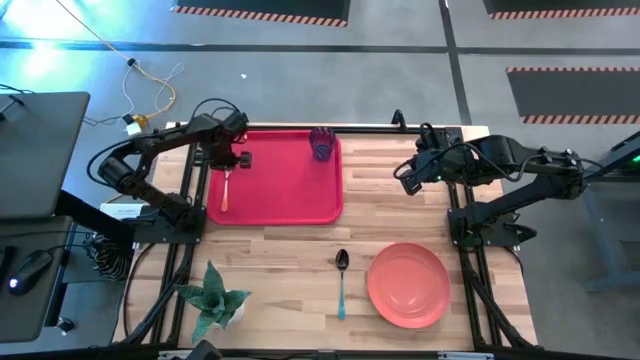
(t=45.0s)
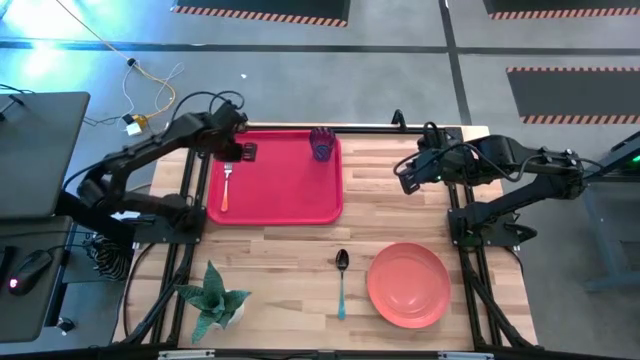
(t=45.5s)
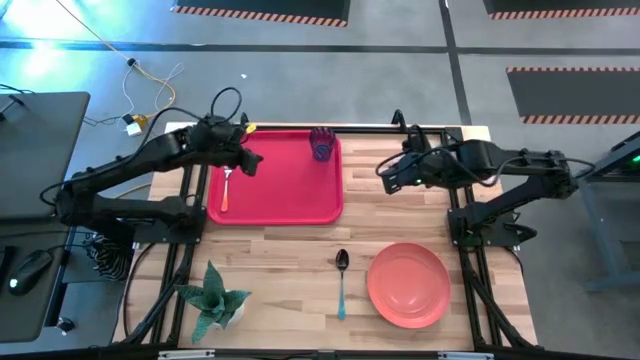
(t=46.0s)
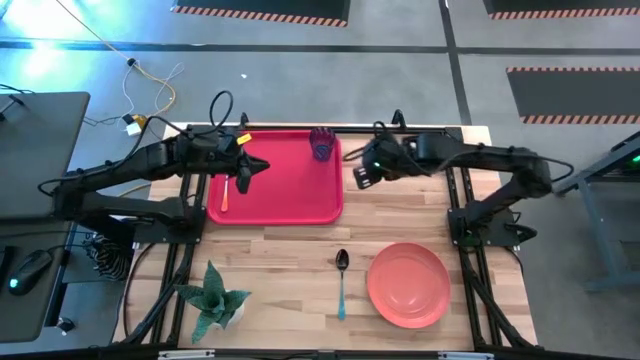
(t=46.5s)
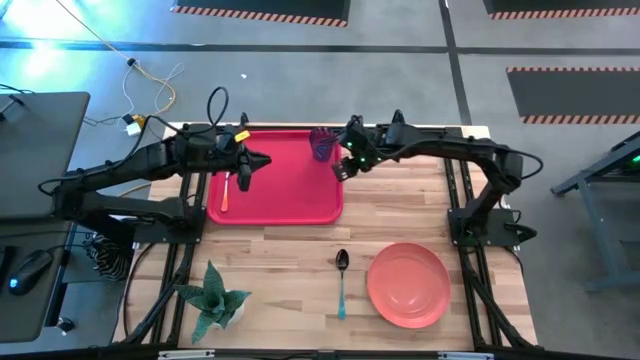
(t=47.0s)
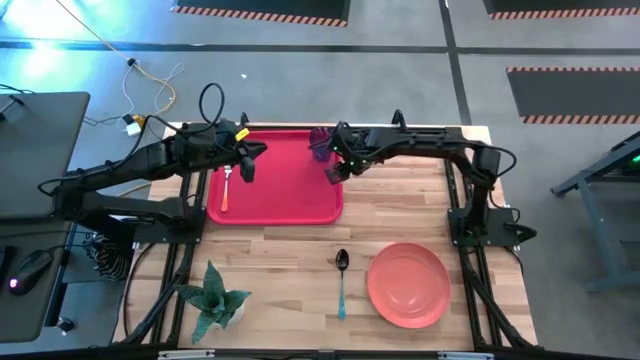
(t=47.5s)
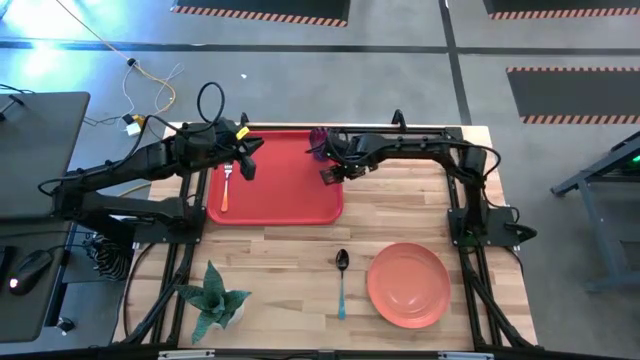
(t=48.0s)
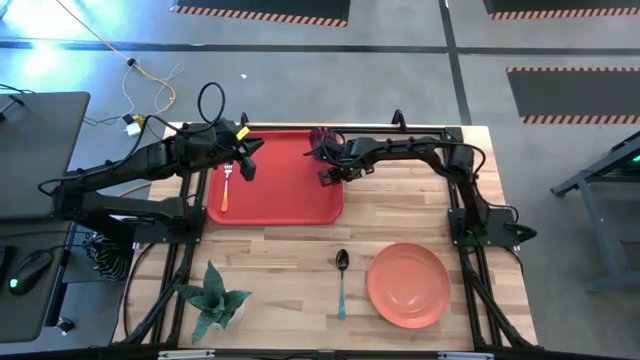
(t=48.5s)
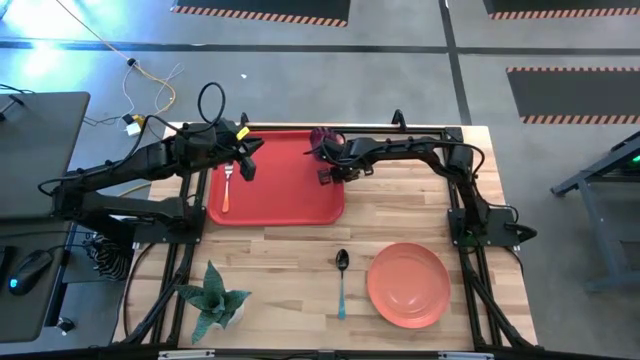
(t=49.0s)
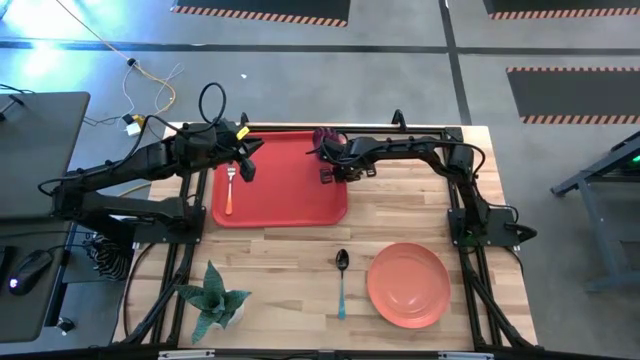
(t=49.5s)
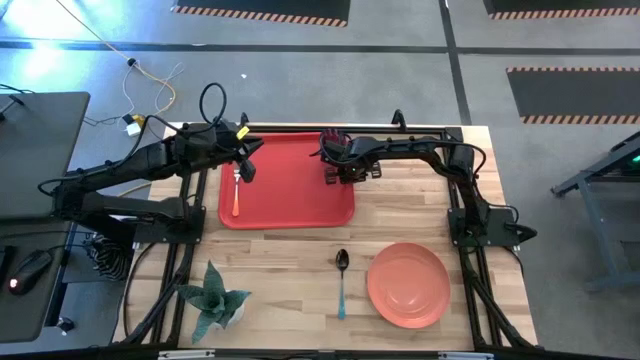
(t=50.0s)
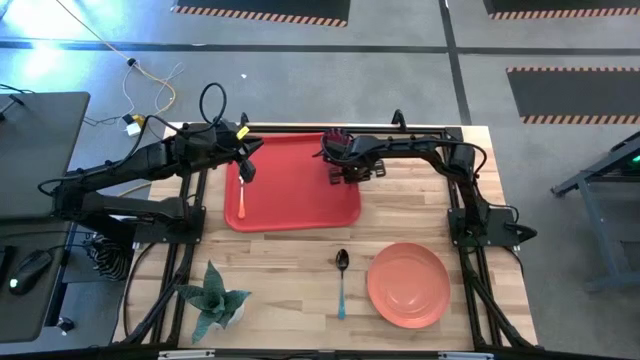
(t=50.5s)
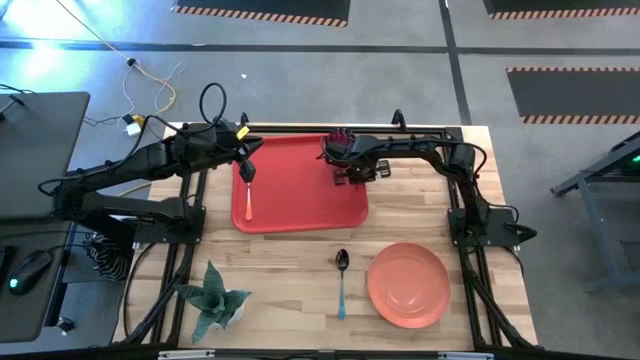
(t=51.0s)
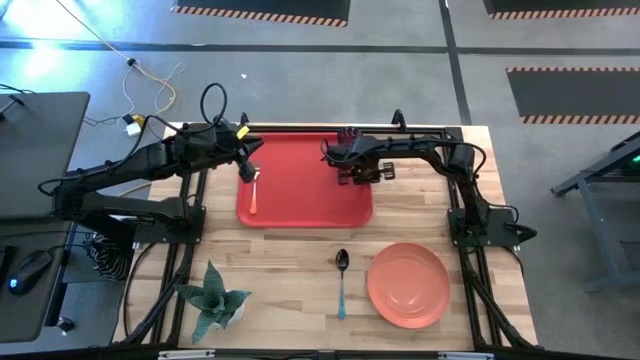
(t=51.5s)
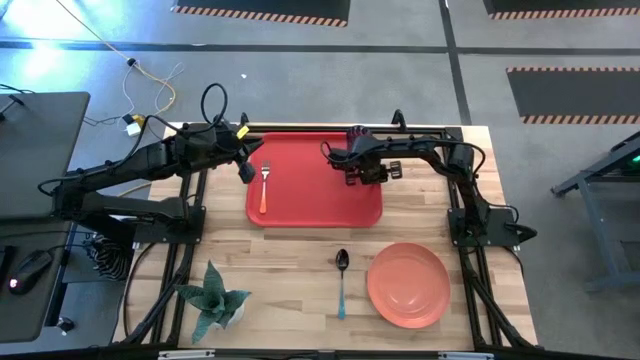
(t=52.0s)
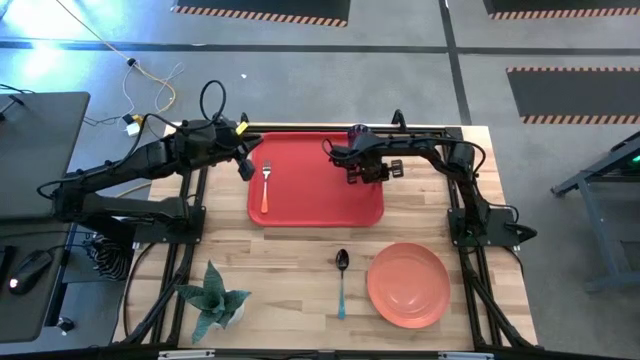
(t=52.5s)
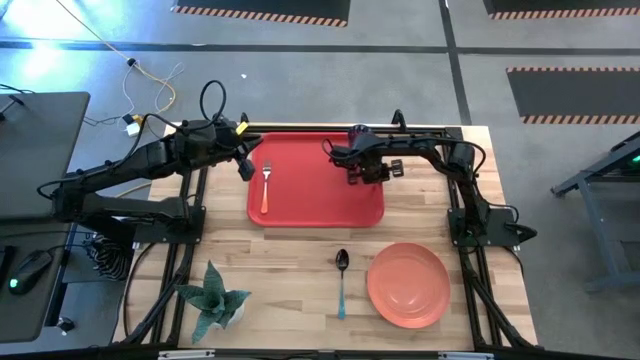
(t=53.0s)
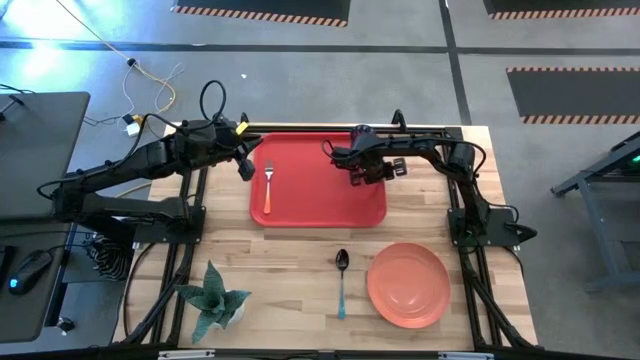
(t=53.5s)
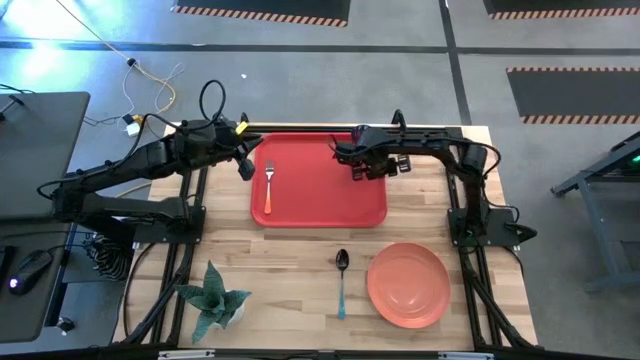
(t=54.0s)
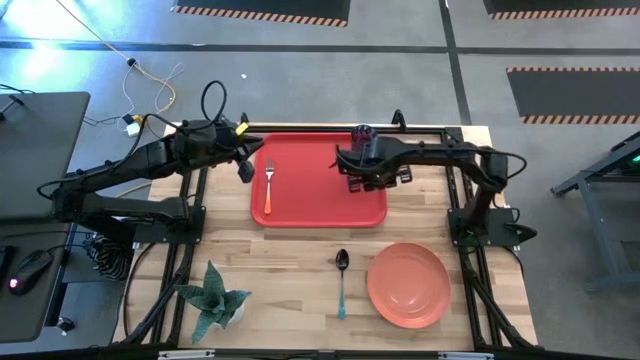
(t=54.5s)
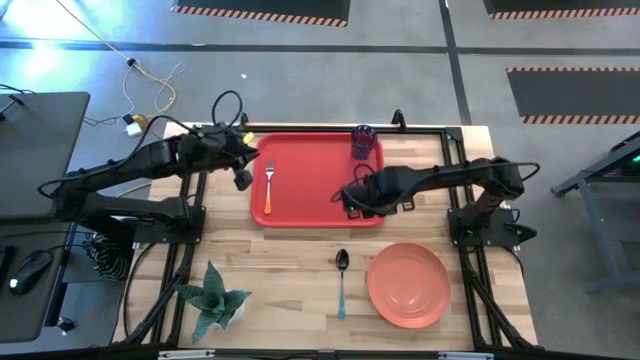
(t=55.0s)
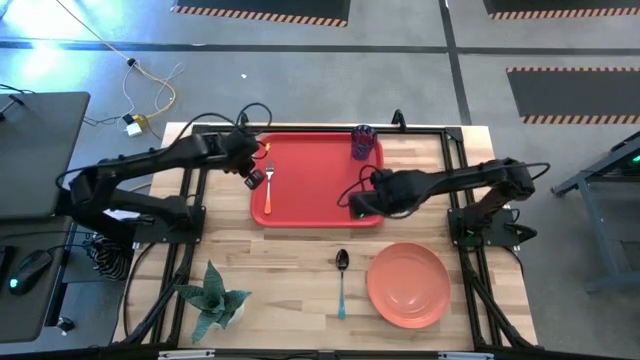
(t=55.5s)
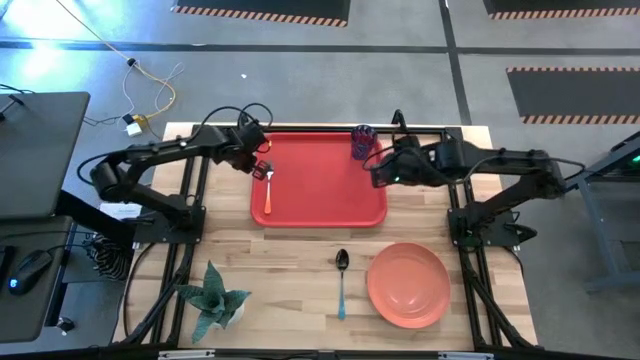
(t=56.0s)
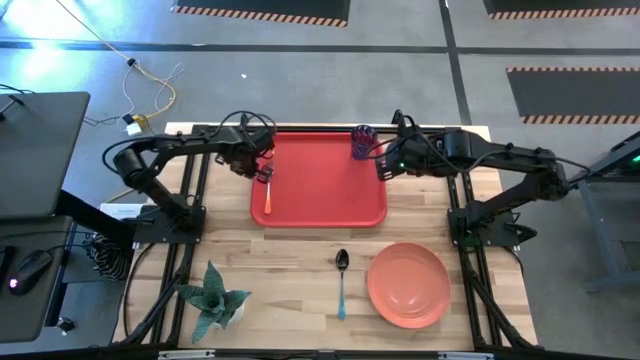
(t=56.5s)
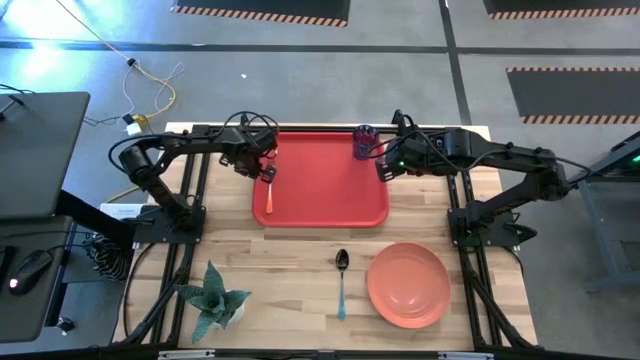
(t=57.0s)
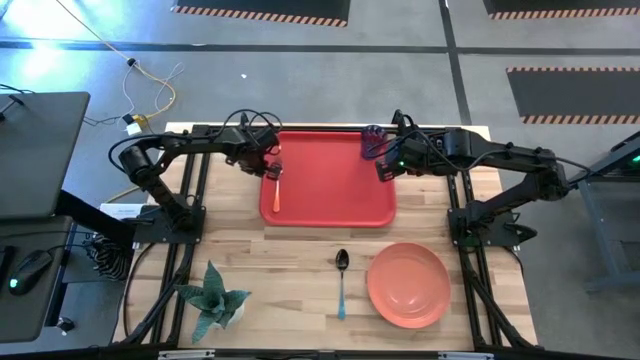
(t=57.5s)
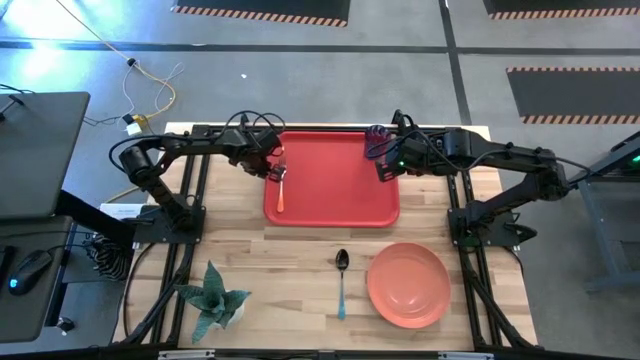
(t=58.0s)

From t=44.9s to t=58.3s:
Task: Pick and place plate/cup/fork/spoon on tray
Move the red serving tray to the top middle of the table

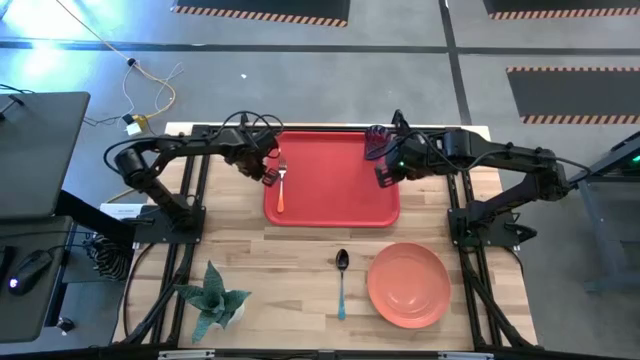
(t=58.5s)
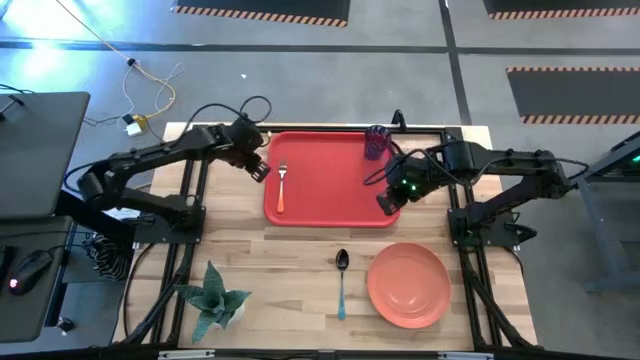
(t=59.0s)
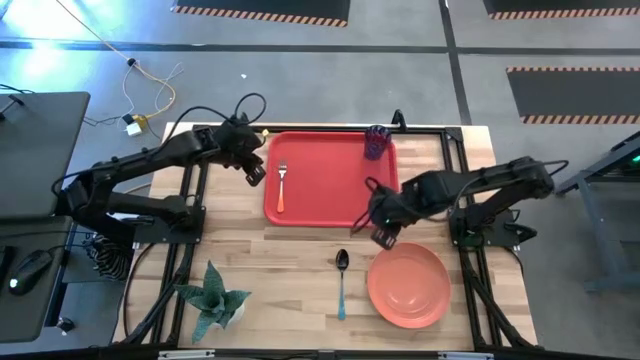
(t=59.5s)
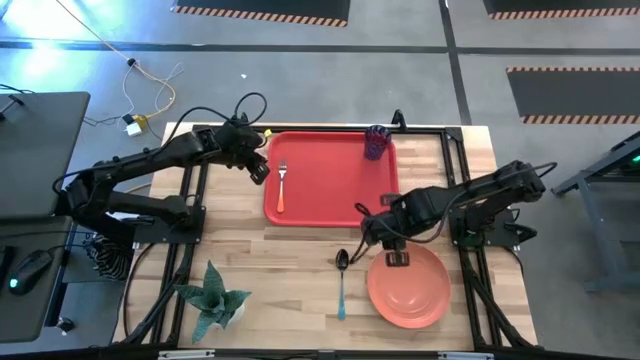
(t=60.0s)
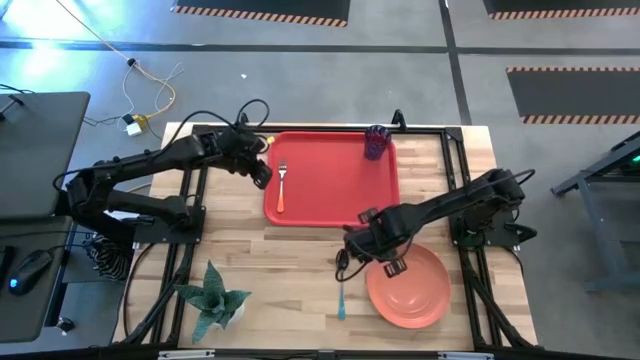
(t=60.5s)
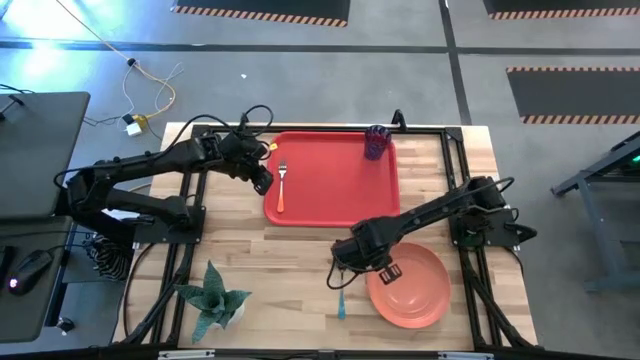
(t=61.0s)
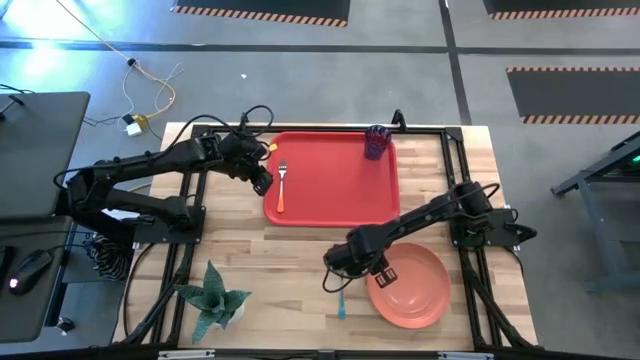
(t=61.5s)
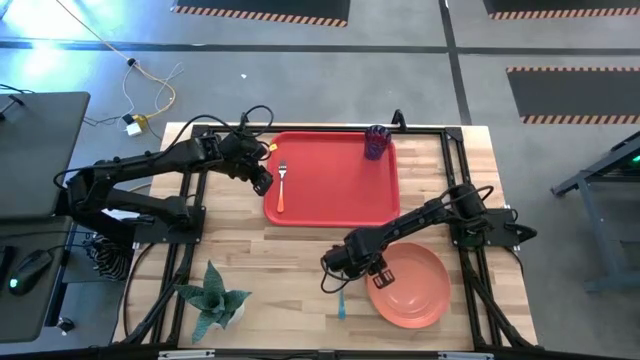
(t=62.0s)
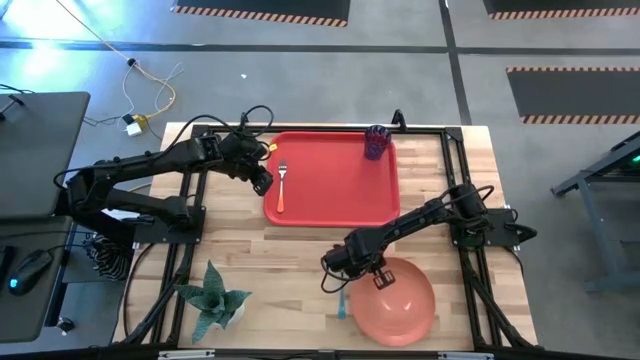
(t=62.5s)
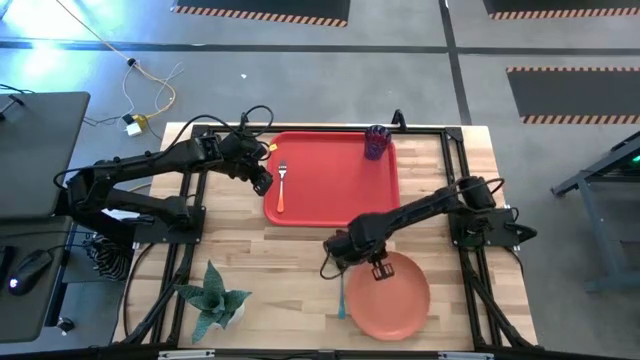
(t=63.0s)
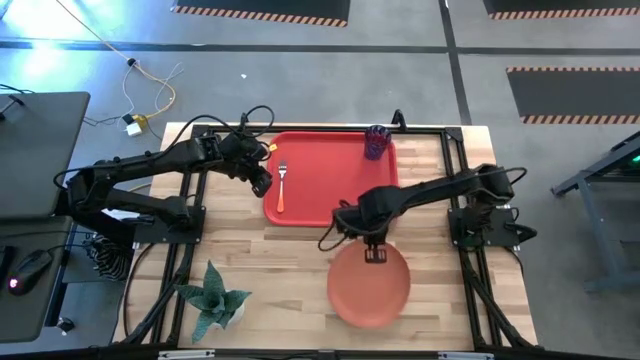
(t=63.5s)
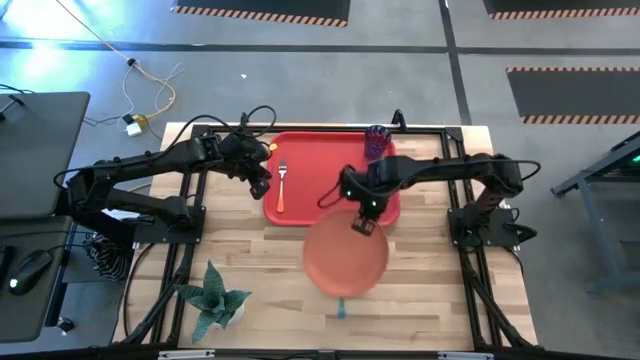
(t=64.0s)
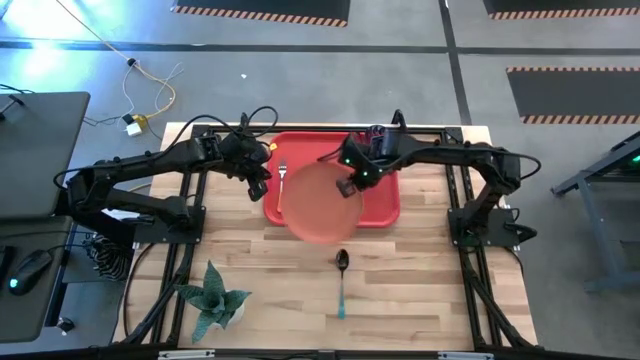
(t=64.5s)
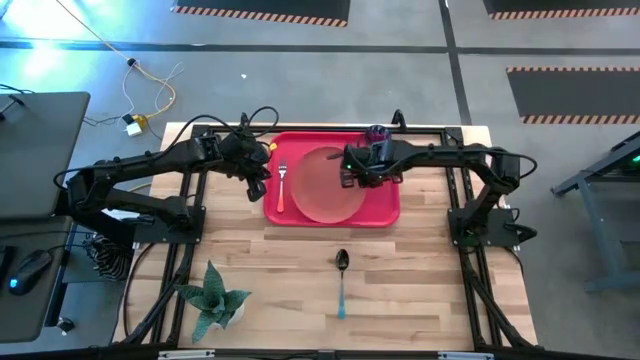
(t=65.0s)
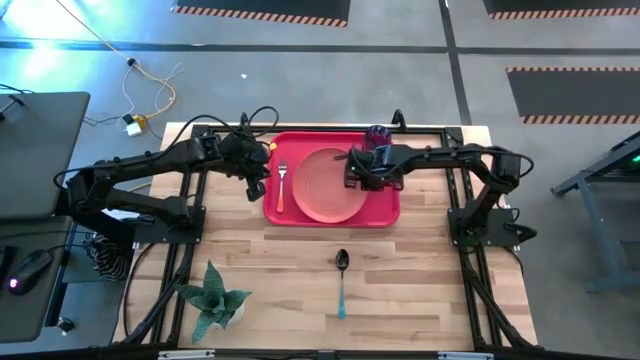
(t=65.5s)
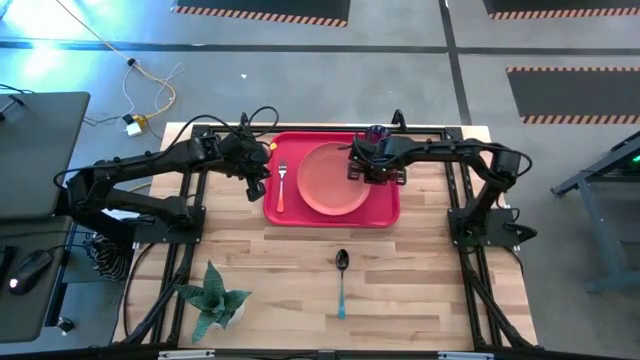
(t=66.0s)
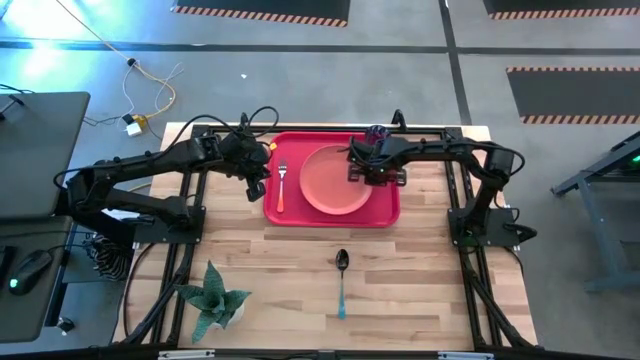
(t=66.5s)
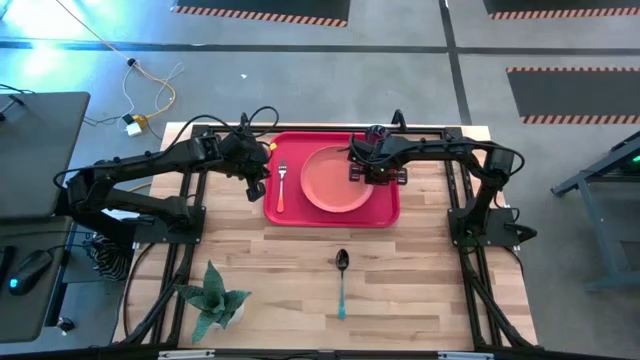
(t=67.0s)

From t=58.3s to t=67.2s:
Put the orange plate on the red serving tray to the bottom left of the blue glass
